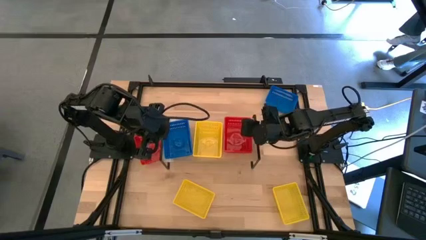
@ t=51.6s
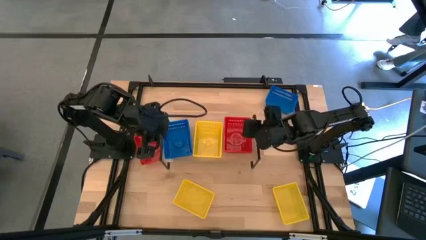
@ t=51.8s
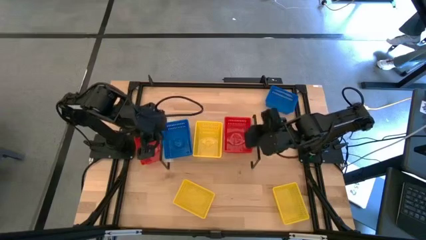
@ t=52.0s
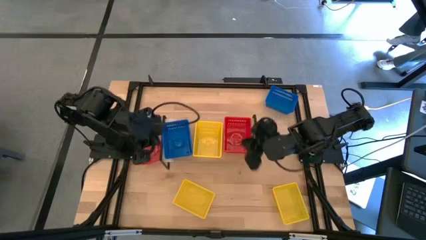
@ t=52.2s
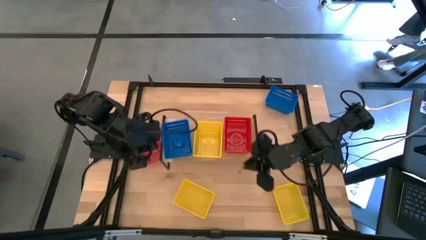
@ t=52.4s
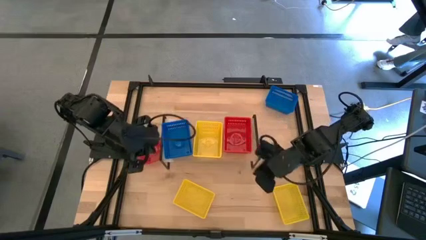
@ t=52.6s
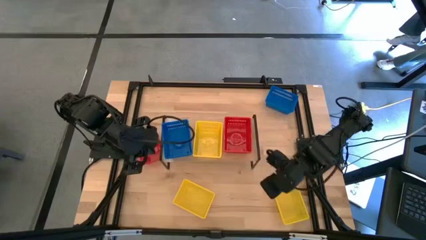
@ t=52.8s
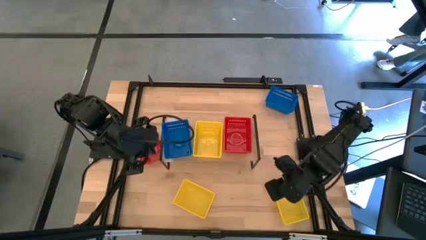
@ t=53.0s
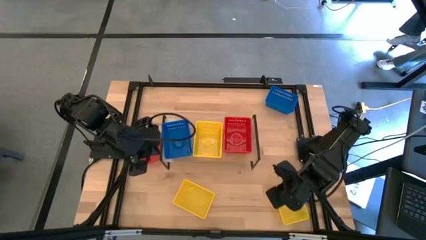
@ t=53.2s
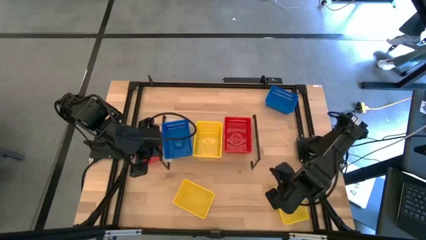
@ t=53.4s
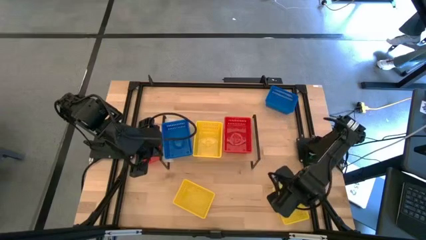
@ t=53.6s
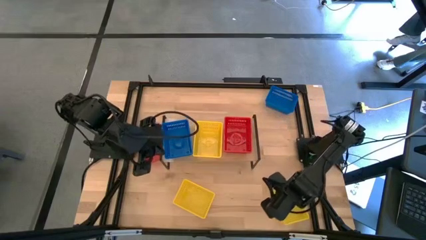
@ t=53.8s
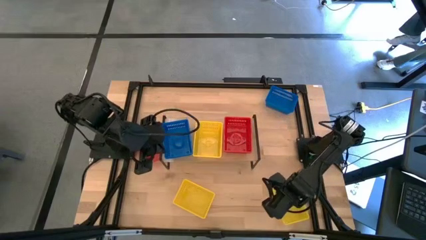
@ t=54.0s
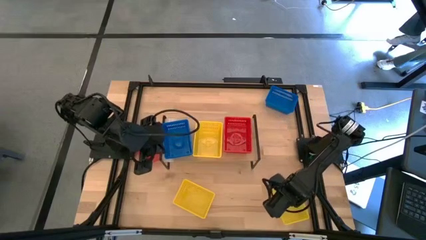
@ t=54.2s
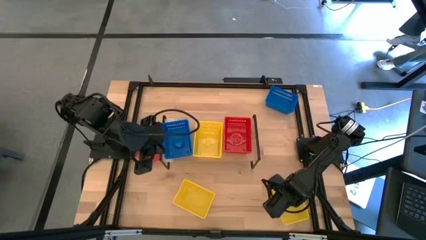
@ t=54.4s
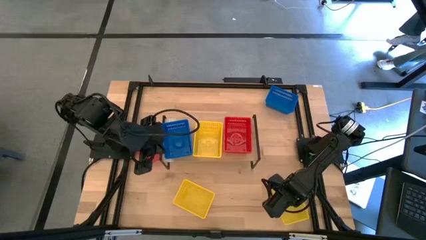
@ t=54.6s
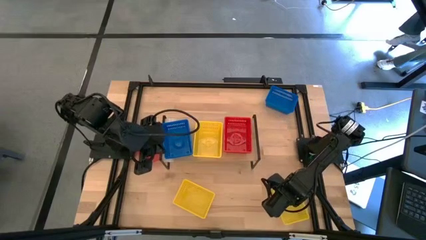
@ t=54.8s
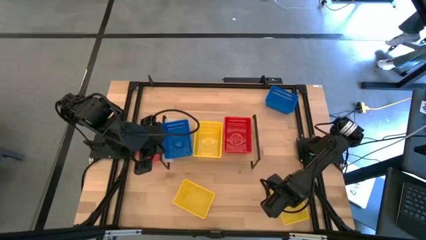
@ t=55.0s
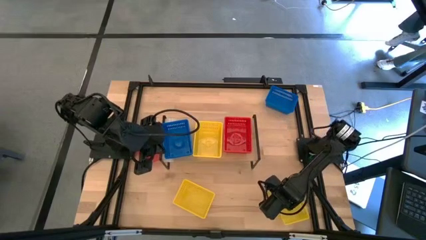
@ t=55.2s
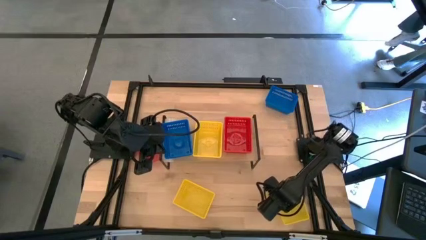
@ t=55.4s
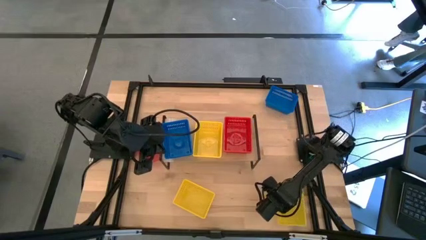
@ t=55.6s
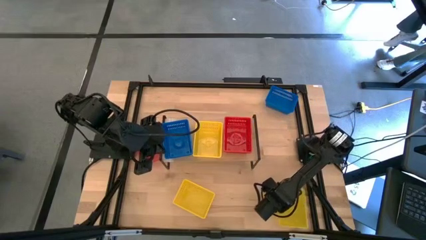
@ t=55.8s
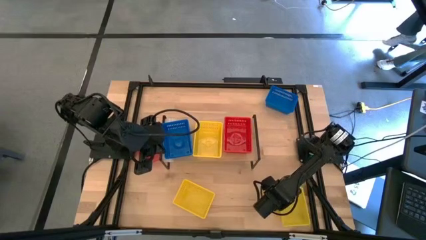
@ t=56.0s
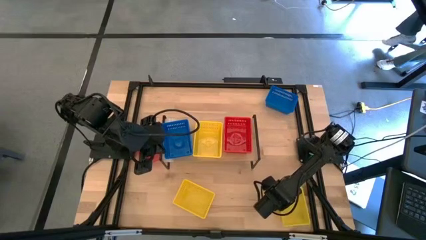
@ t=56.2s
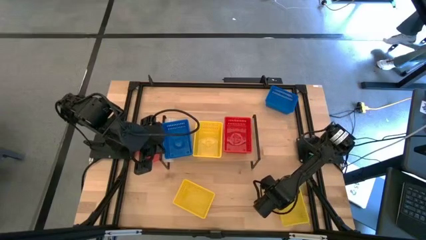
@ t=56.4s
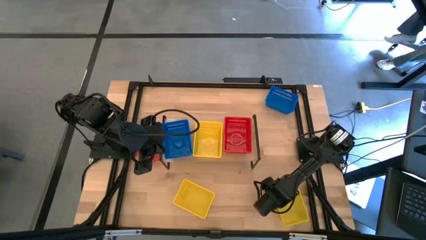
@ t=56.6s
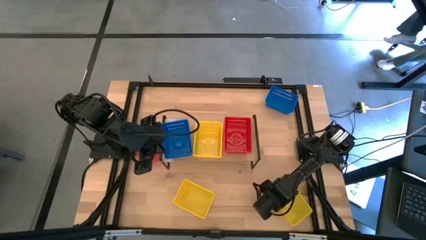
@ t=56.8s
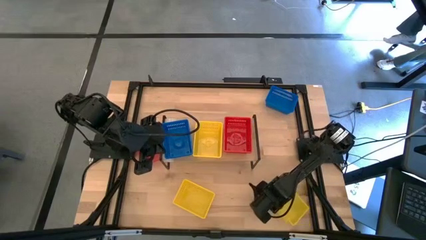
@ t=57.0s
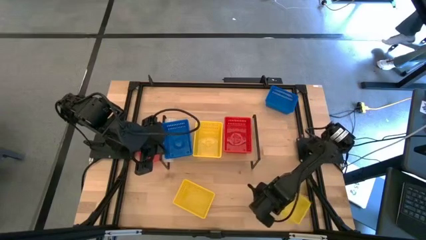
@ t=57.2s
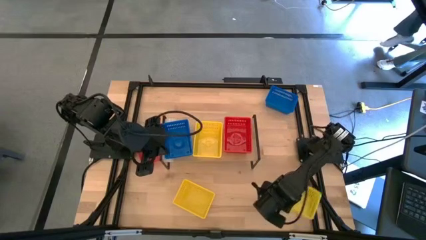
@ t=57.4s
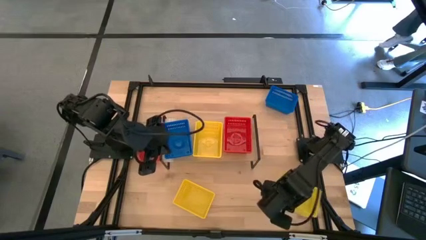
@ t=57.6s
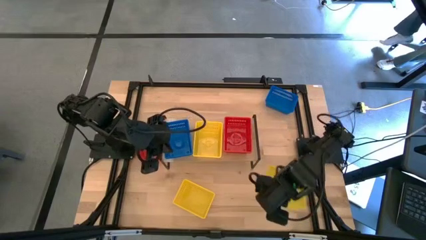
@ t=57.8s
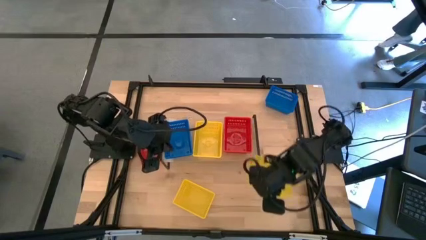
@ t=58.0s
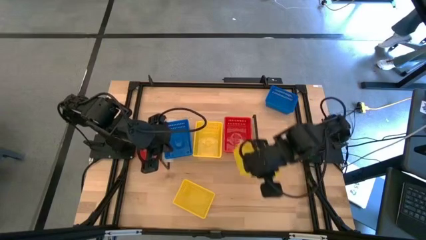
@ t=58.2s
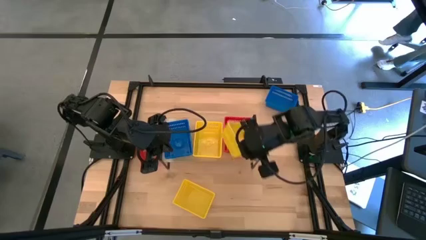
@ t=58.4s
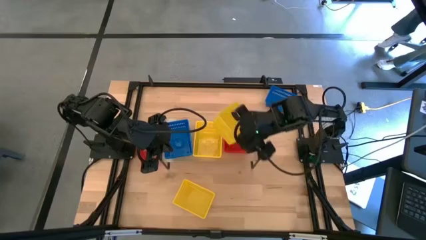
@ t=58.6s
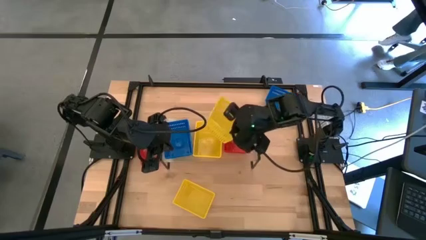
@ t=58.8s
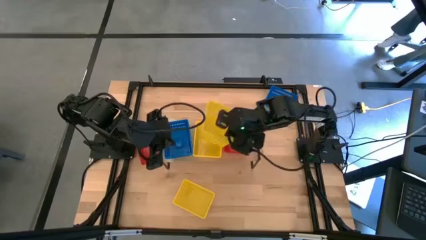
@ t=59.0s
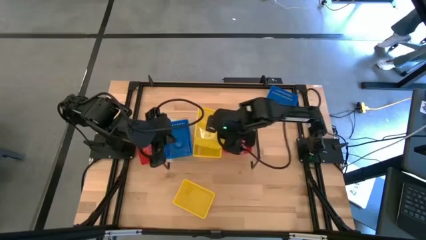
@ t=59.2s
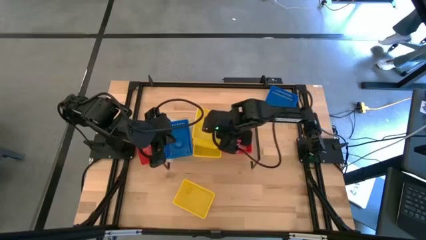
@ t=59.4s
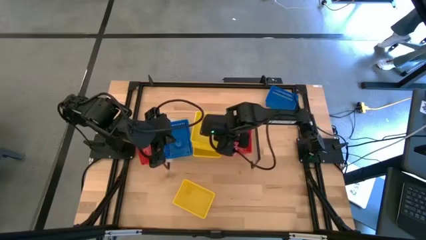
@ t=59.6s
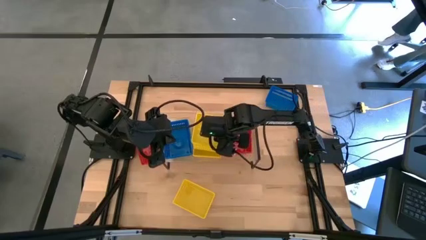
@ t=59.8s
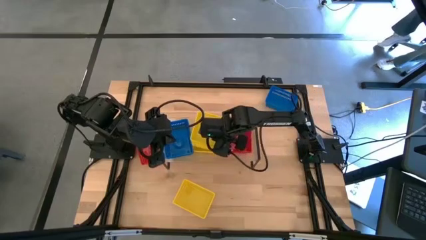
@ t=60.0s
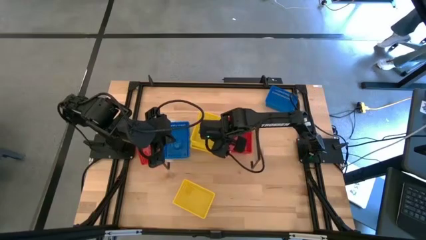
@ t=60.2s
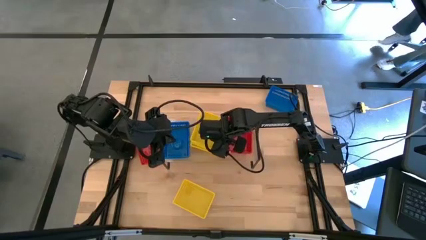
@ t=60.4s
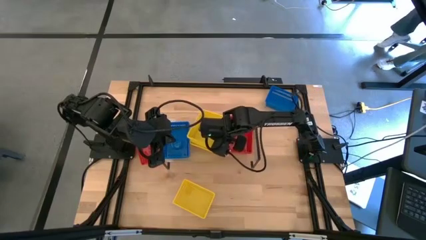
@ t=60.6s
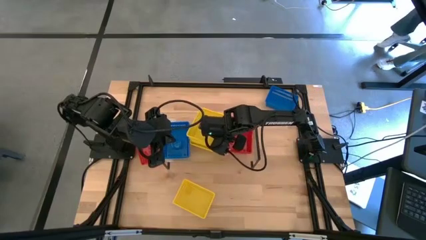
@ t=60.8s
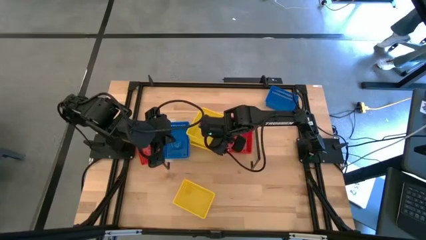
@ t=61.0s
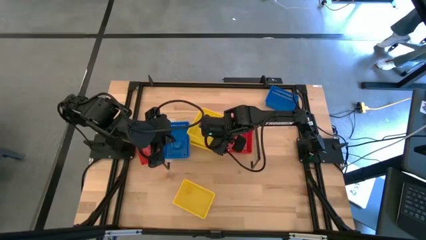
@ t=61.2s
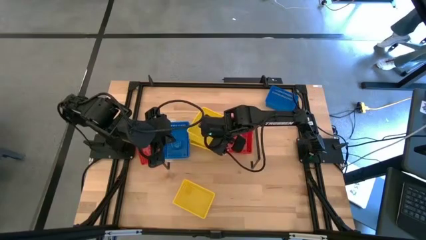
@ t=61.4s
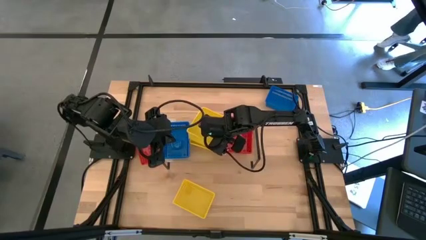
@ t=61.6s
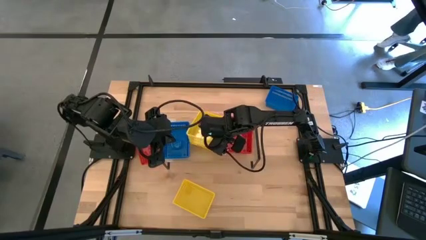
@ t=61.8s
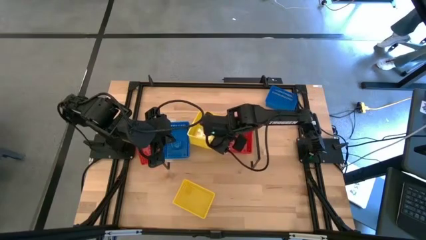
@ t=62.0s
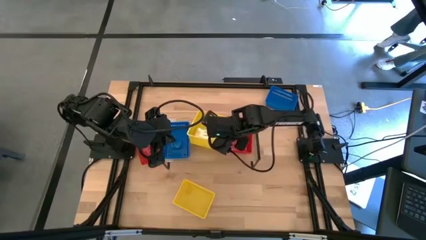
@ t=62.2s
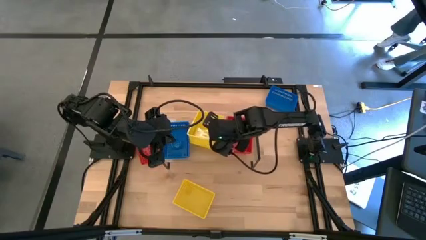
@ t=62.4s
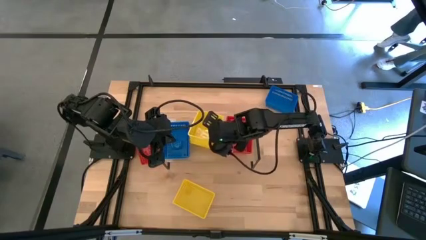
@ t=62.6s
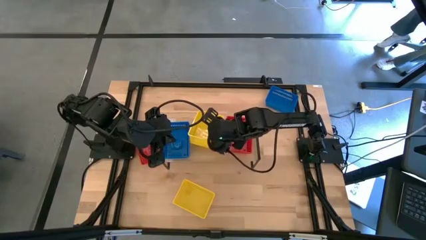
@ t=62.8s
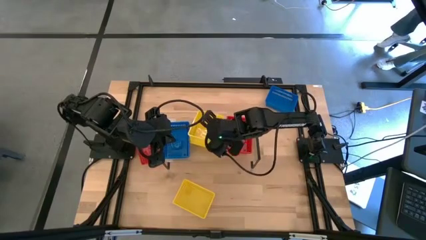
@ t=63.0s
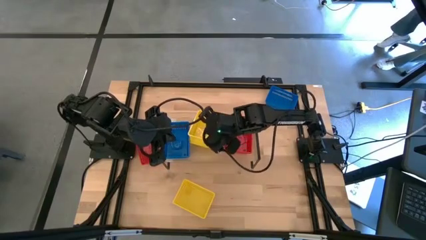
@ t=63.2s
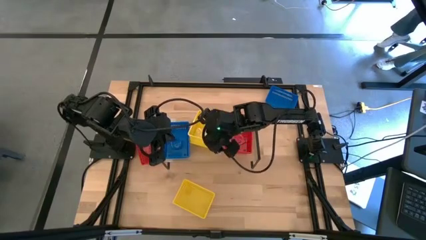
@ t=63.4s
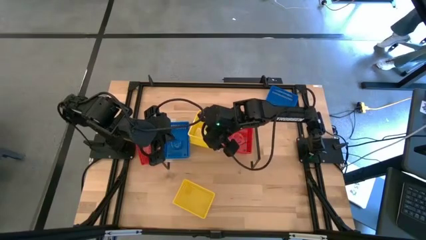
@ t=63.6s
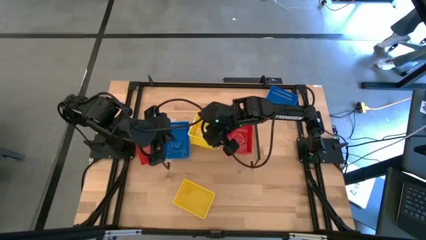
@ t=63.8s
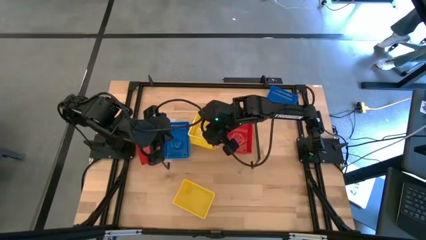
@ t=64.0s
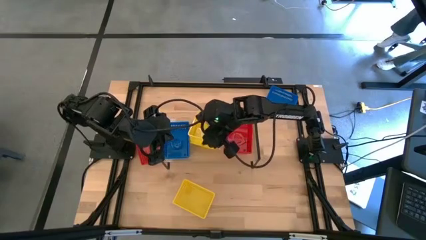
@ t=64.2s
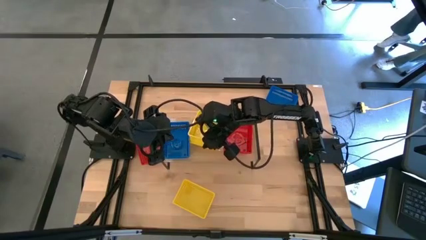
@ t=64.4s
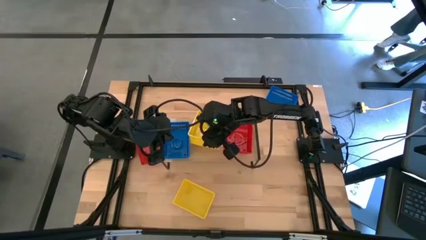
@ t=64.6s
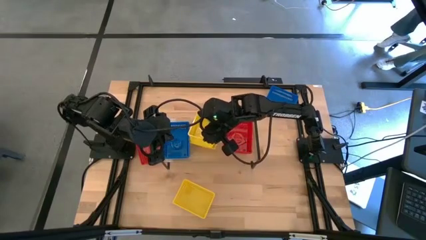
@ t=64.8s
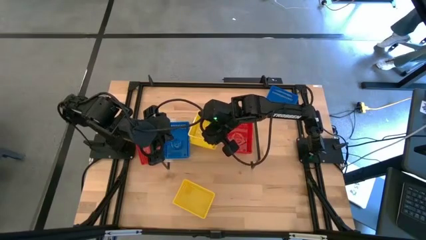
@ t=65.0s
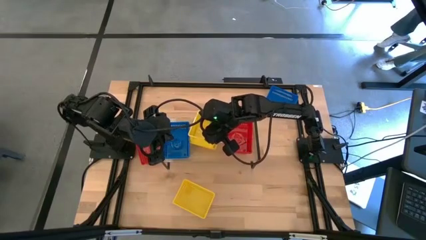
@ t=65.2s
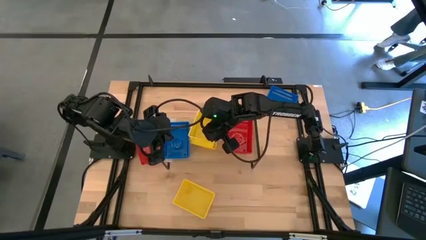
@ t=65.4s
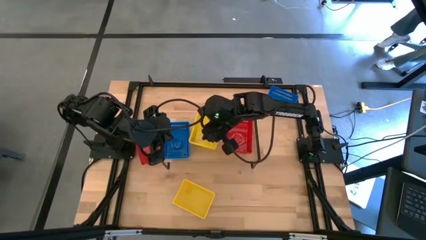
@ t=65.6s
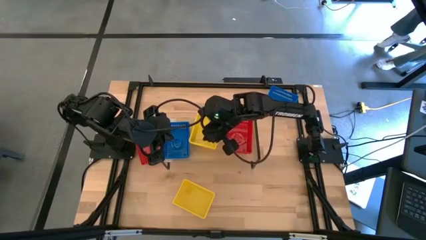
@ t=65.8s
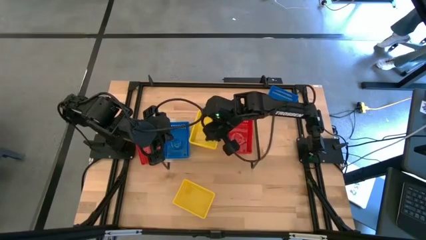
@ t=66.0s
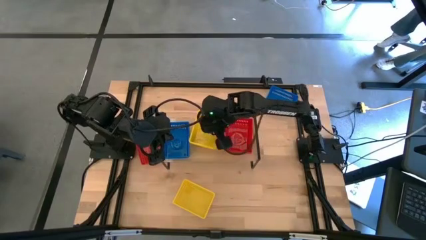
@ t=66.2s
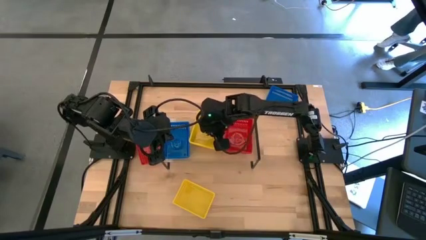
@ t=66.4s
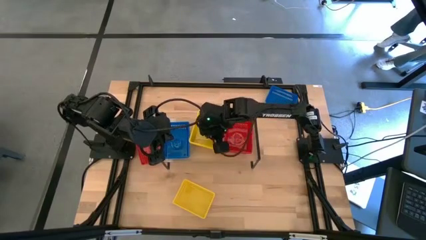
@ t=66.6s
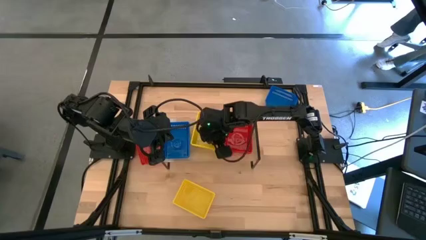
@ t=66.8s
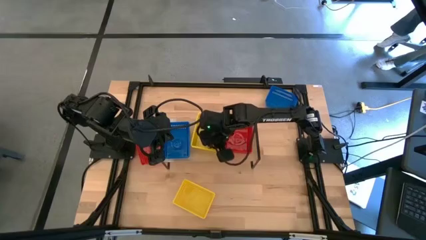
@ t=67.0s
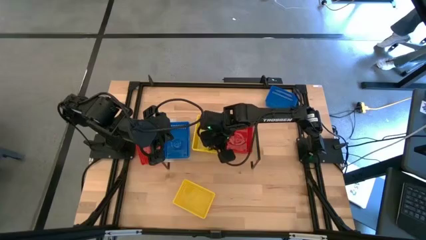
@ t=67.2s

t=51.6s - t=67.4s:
Task: Stack baskets on shelf by color
Stack the right yellow bin on top of the yellow bin on the shelf
